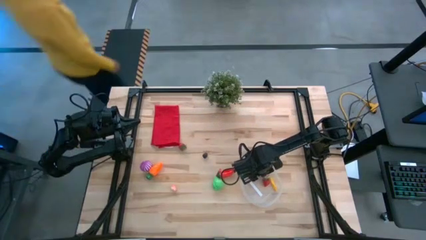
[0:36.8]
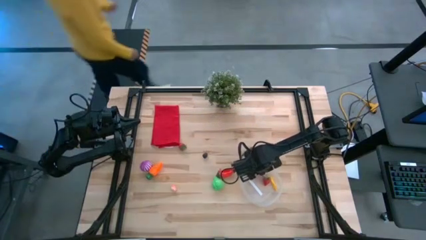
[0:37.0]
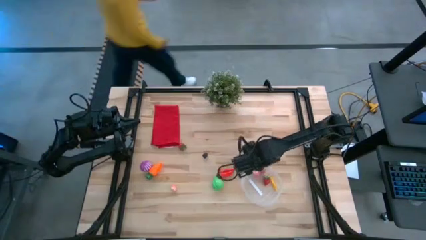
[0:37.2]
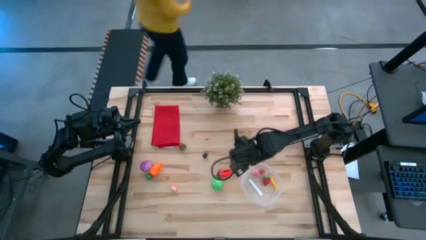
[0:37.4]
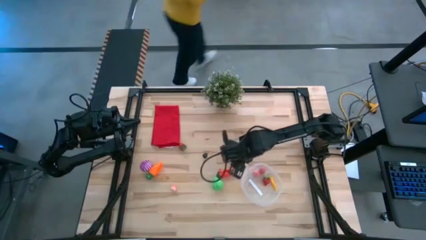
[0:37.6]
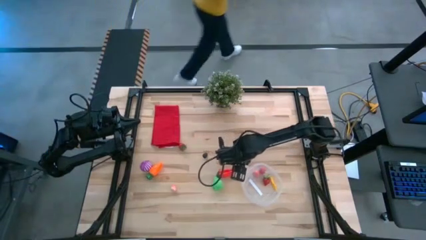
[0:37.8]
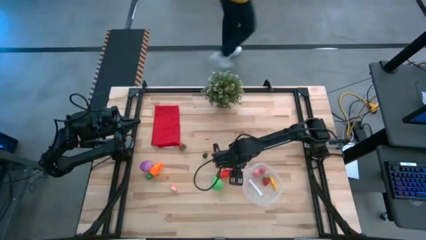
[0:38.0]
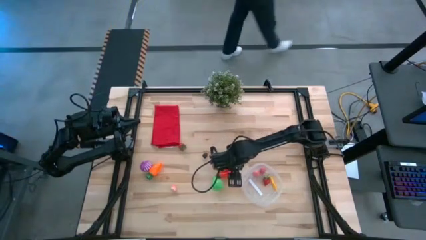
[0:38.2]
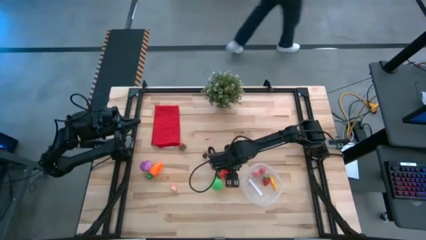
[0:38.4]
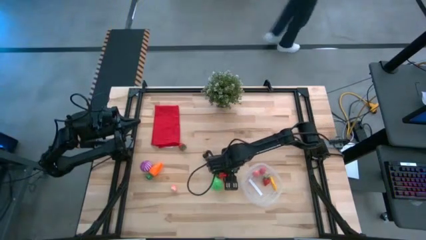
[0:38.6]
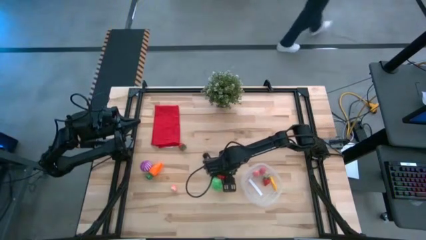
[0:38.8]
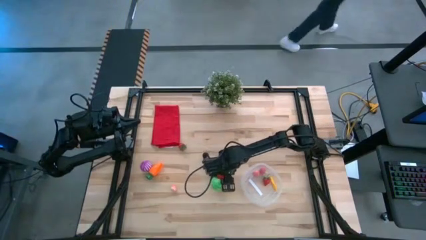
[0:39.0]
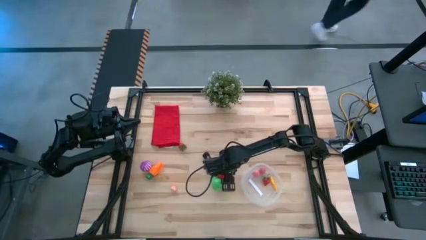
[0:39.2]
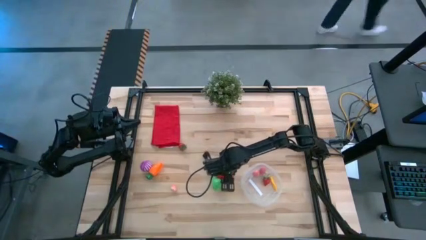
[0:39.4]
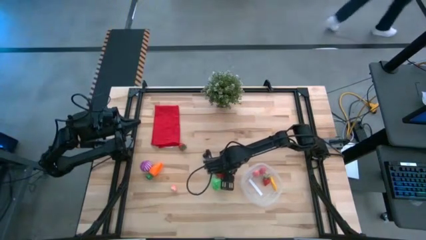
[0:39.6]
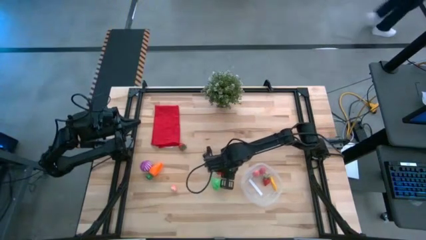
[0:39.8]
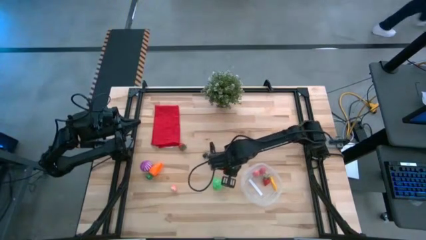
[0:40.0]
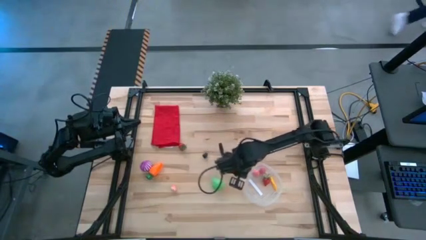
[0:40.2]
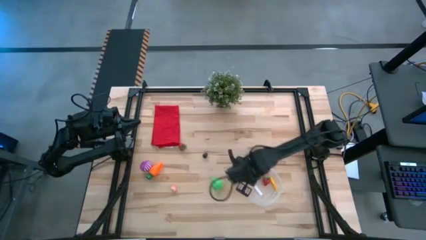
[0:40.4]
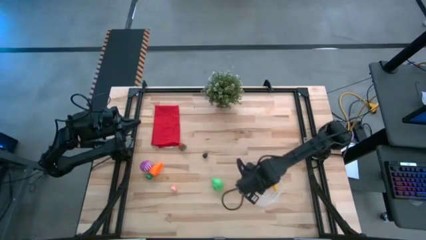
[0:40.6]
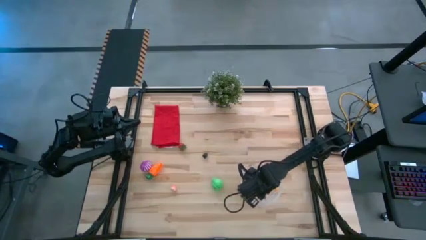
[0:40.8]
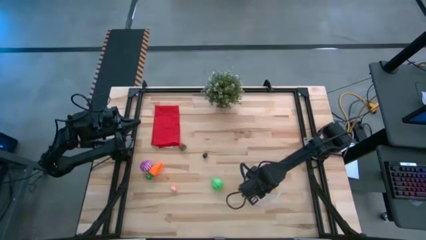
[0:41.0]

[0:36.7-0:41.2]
Task: Pick and placing Produce into tupperware
Put the red bell pepper into the transparent bin

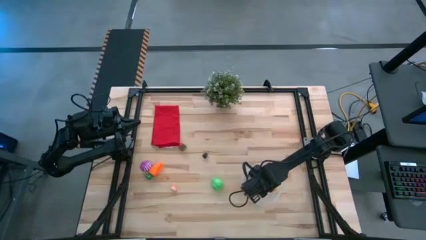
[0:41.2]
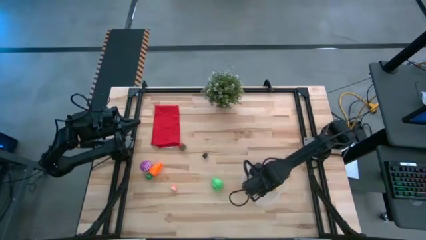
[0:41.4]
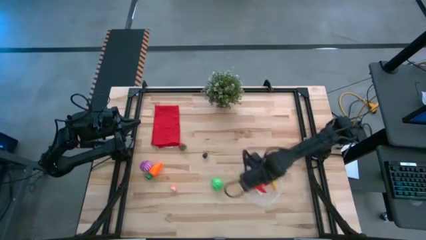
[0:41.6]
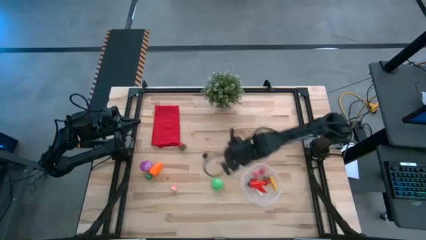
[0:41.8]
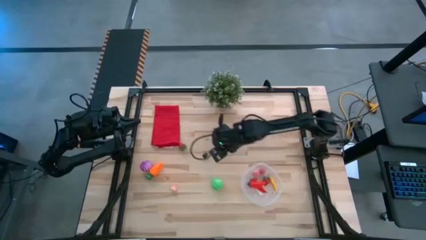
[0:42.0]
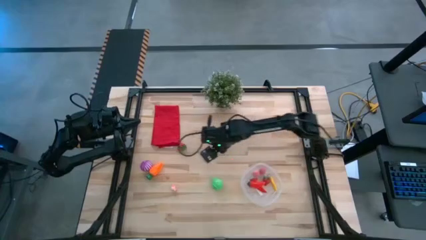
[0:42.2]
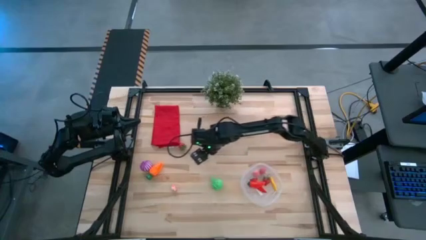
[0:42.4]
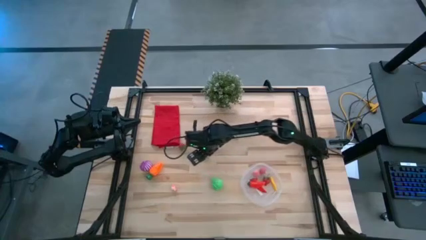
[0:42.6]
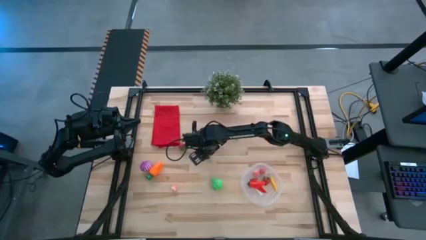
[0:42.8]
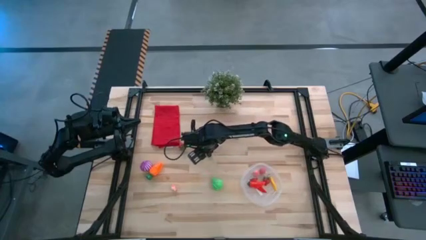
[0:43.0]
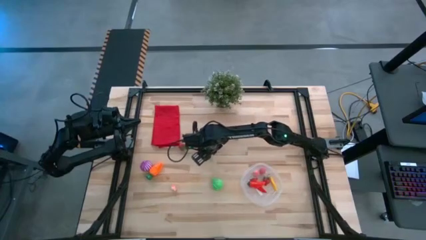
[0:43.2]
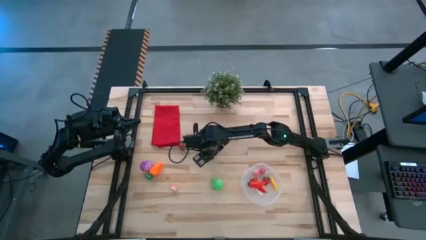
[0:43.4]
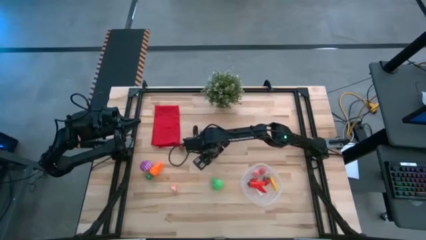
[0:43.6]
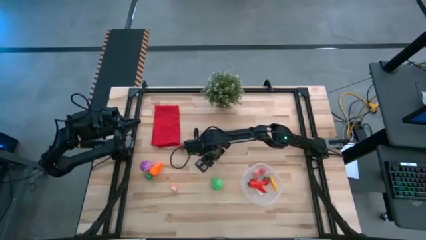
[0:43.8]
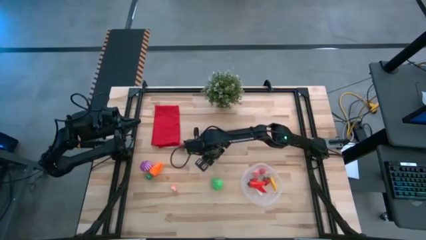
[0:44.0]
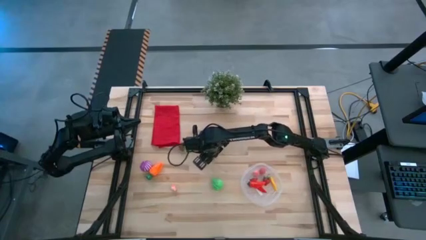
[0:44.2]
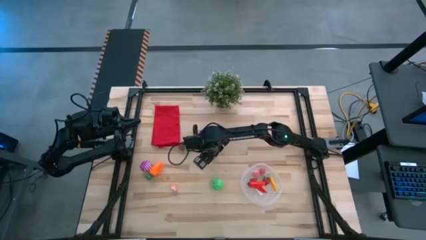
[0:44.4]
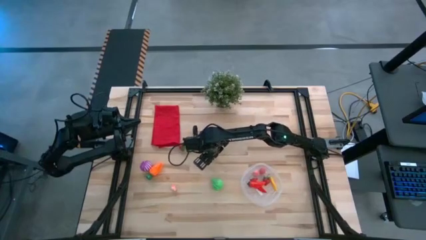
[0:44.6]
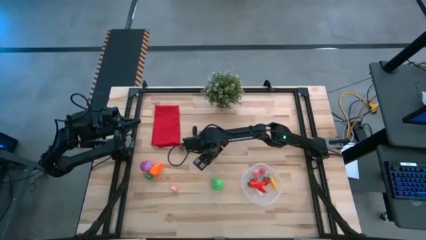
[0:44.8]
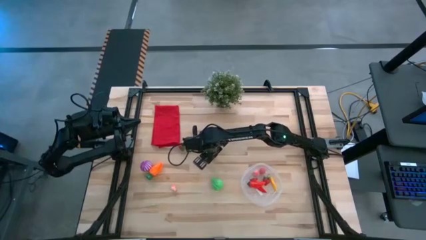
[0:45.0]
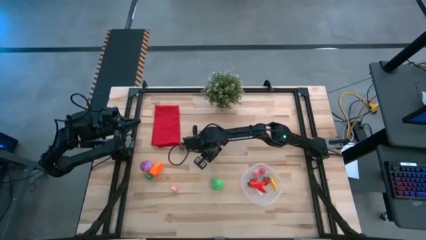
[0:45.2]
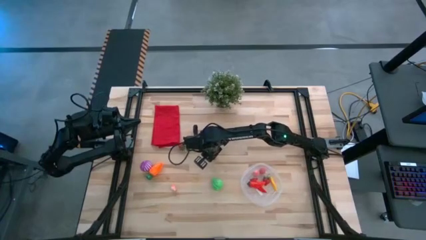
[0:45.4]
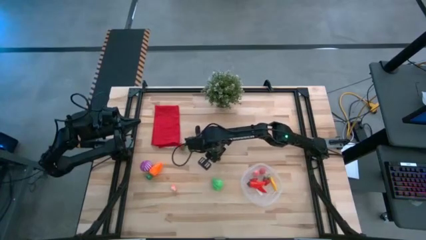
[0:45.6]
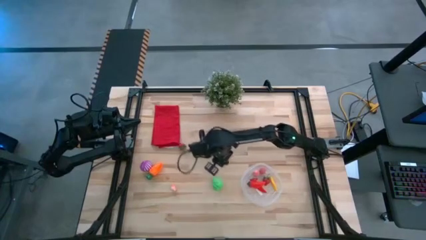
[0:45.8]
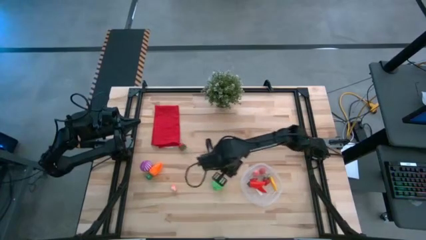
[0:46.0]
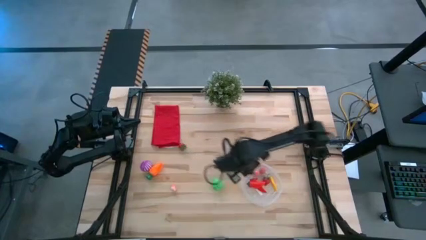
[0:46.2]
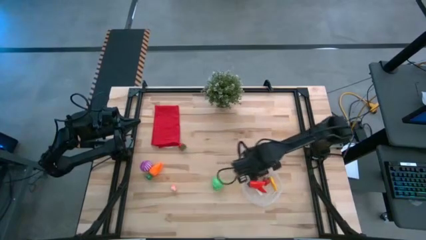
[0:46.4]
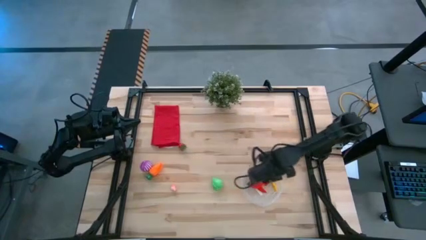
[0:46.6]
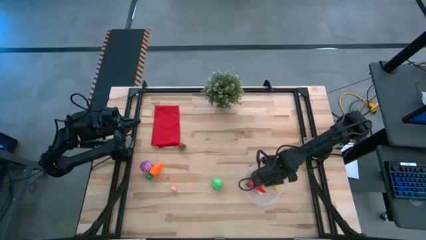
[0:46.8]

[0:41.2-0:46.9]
Put the blackberry into the transparent bin

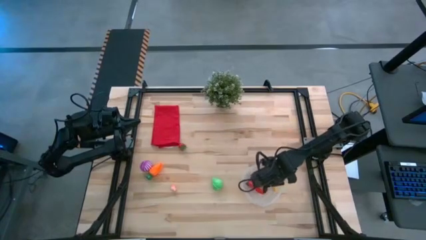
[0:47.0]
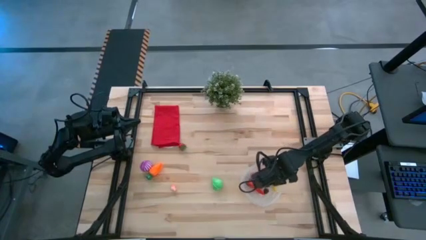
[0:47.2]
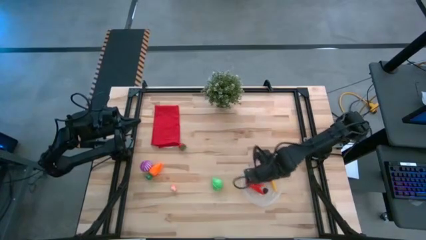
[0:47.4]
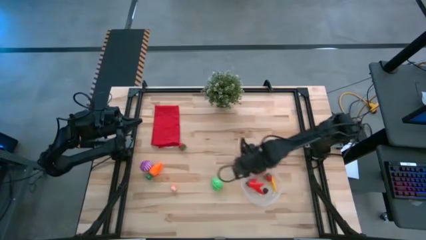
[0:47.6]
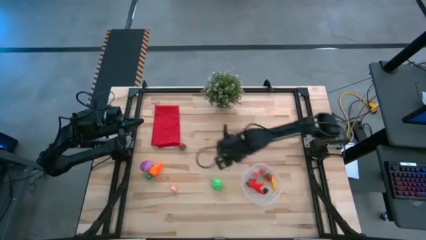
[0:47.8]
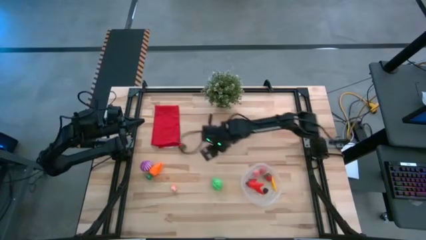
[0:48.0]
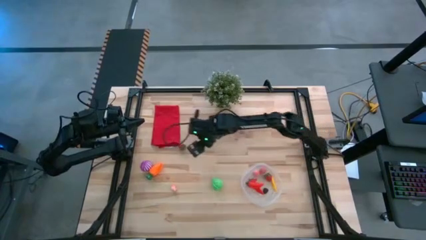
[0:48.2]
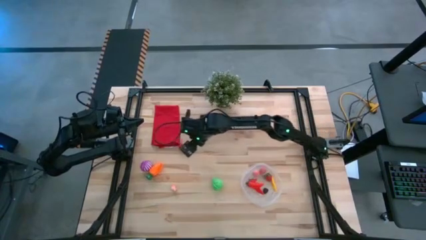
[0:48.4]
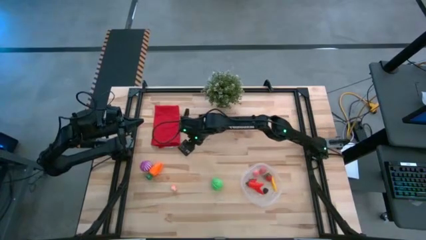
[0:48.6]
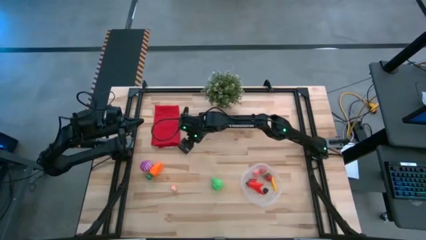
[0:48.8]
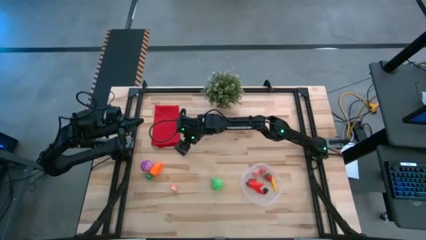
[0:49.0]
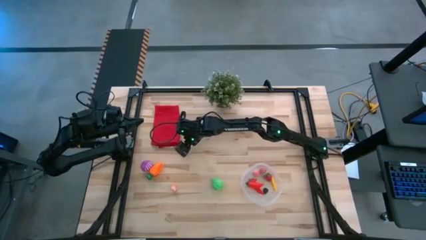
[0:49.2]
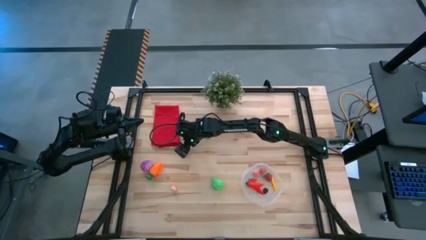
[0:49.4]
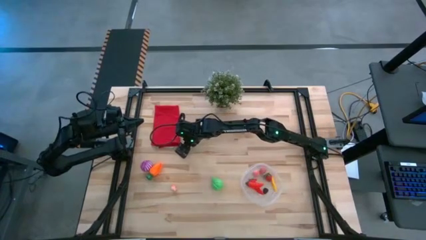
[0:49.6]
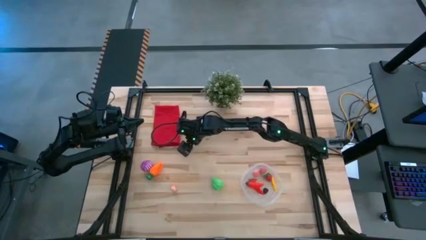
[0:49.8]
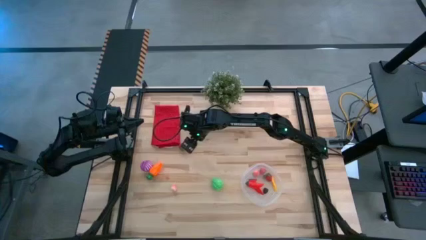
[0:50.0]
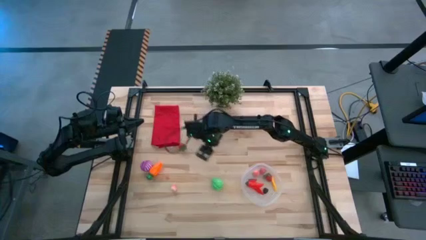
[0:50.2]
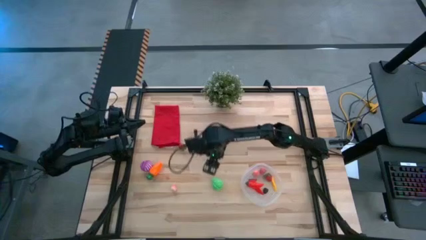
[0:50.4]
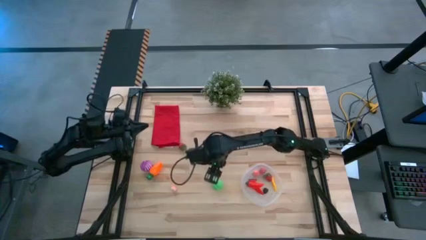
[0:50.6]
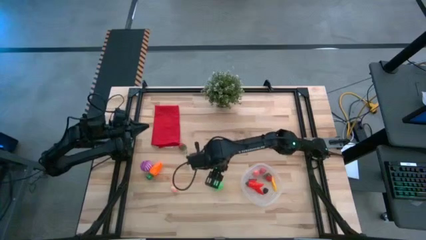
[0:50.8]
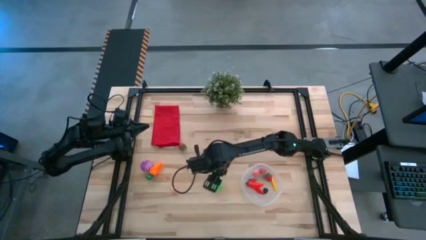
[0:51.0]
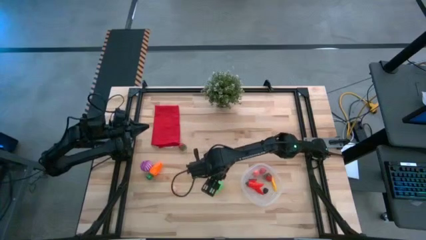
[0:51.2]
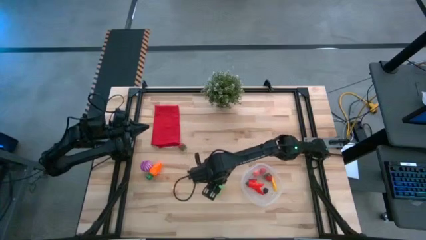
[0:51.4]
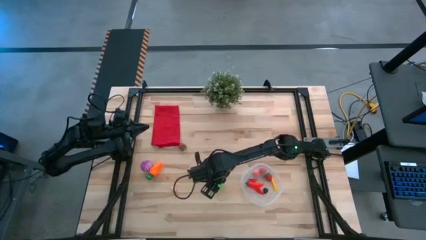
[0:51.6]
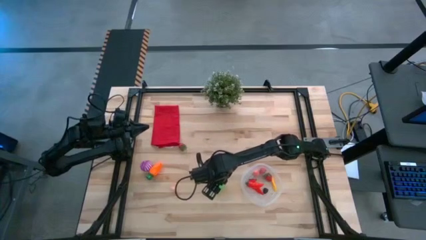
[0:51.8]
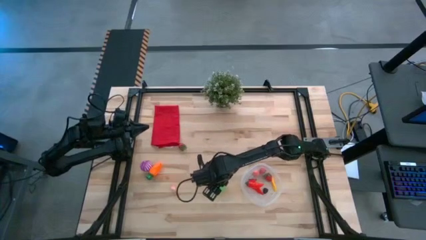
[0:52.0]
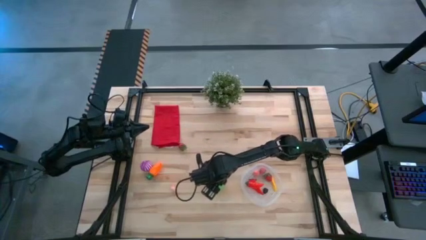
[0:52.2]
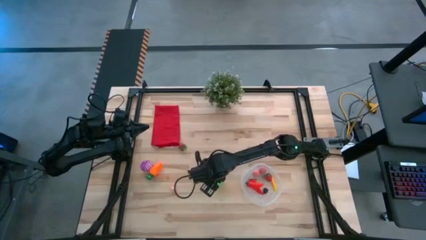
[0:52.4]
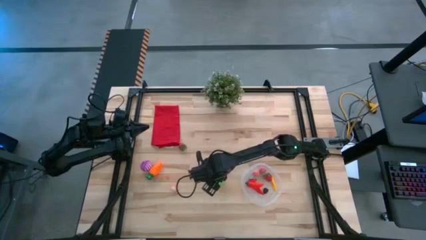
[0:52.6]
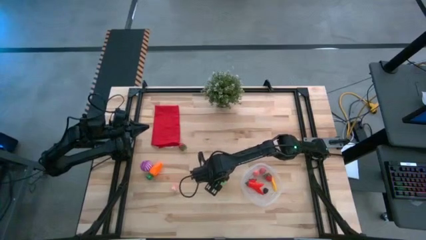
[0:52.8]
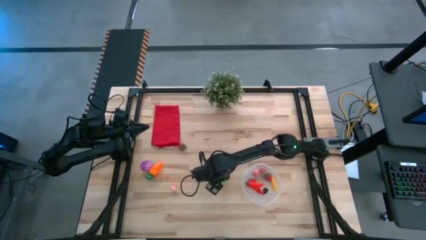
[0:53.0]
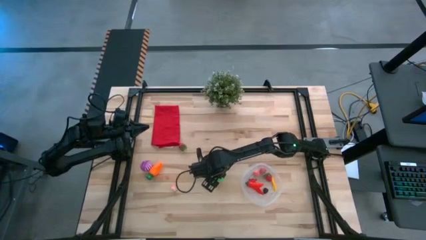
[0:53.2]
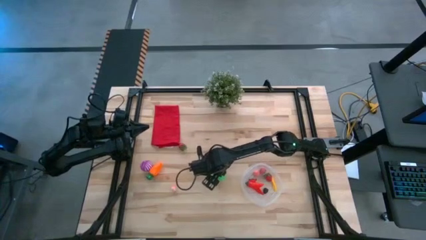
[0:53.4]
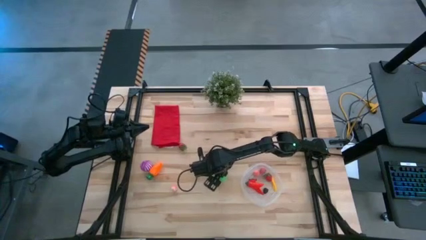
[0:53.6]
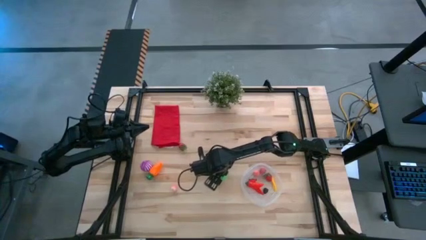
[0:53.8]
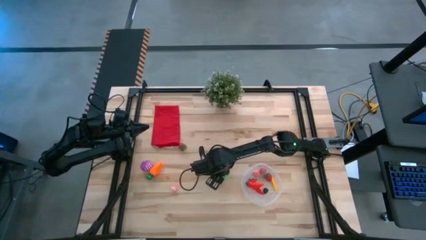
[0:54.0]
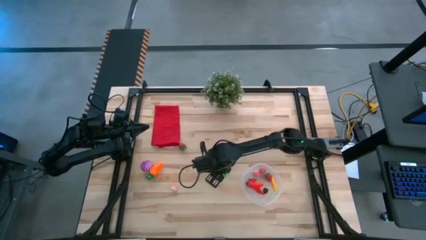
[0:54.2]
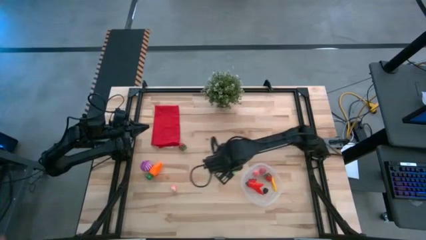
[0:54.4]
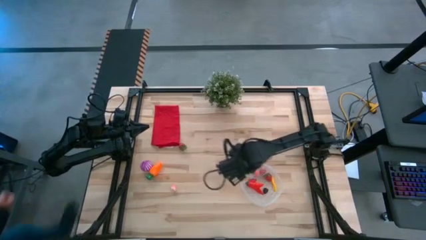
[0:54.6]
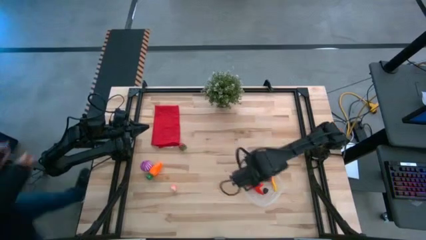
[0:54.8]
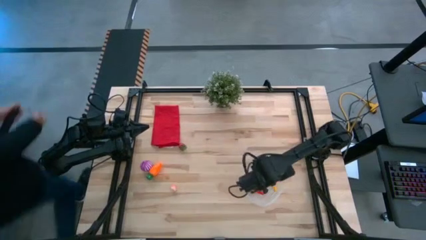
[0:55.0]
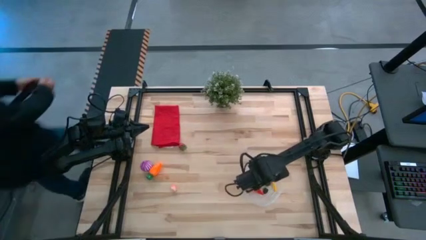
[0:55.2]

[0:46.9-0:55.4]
Put the green pear into the transparent bin
